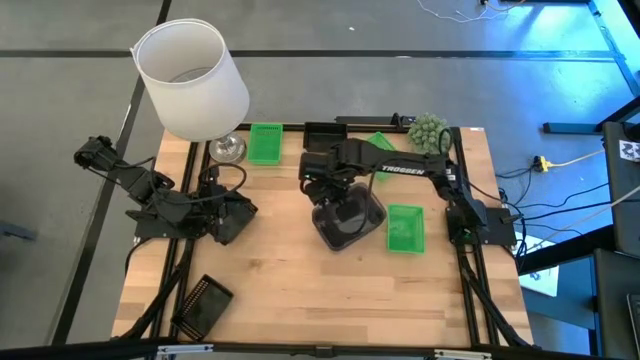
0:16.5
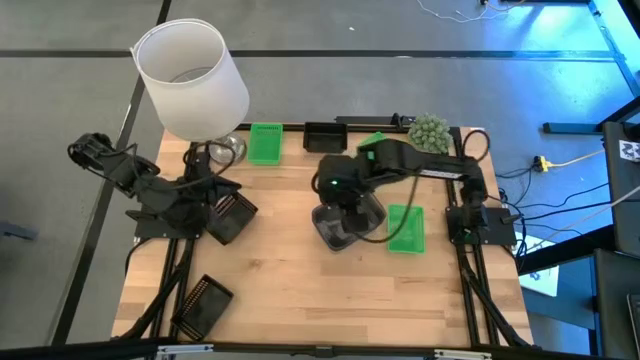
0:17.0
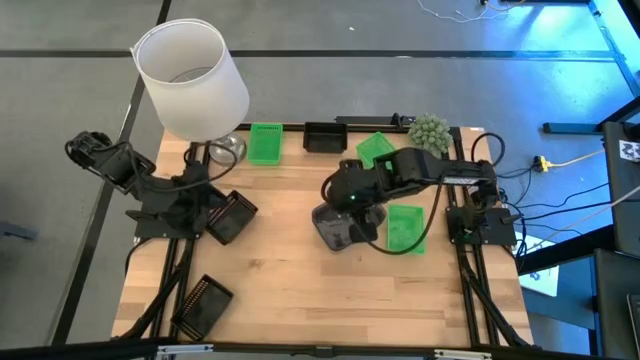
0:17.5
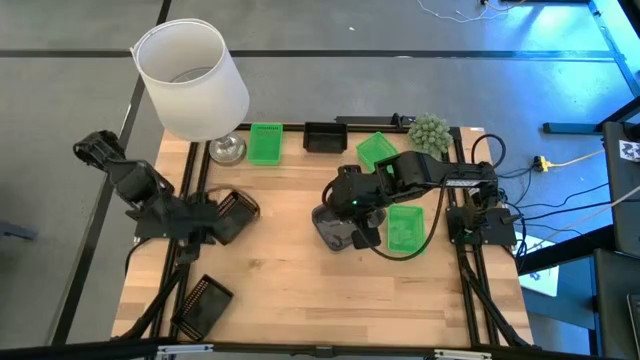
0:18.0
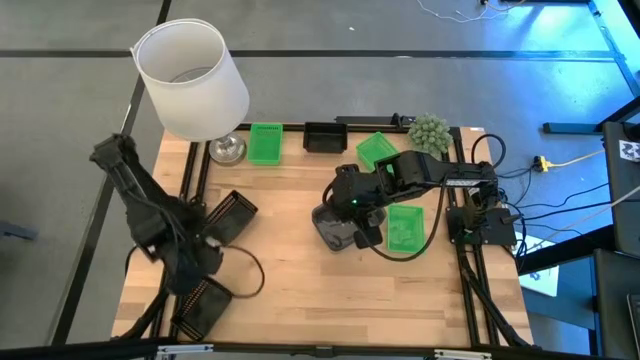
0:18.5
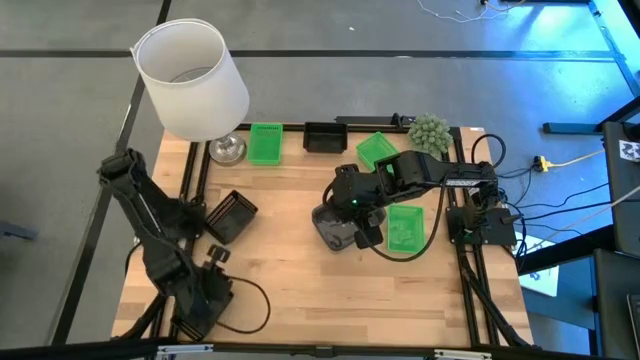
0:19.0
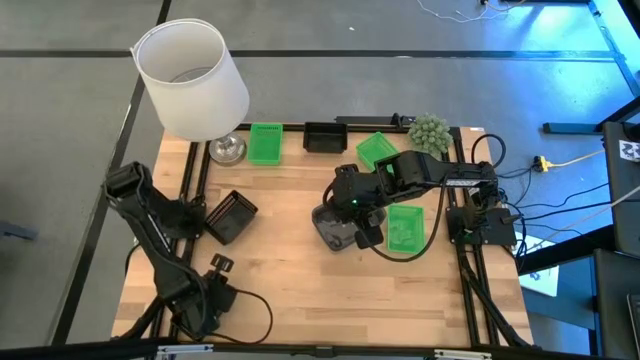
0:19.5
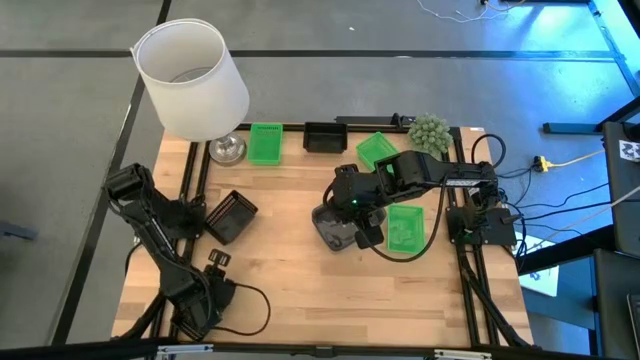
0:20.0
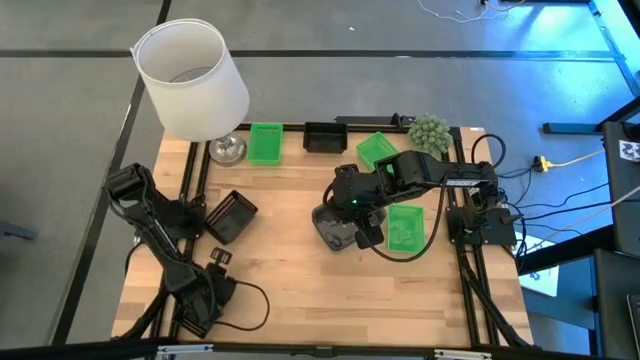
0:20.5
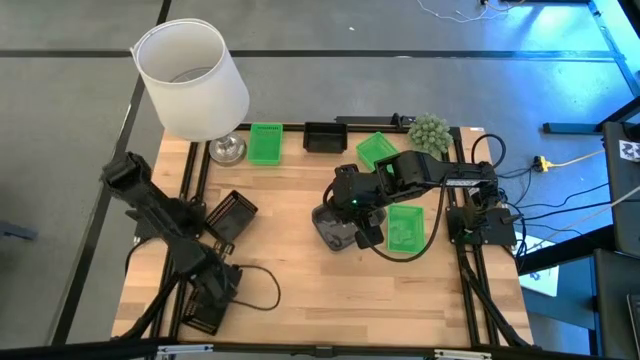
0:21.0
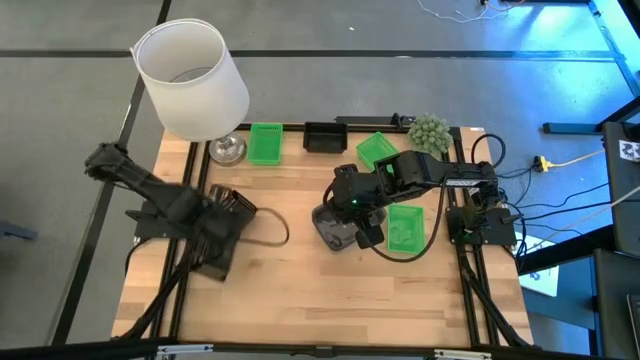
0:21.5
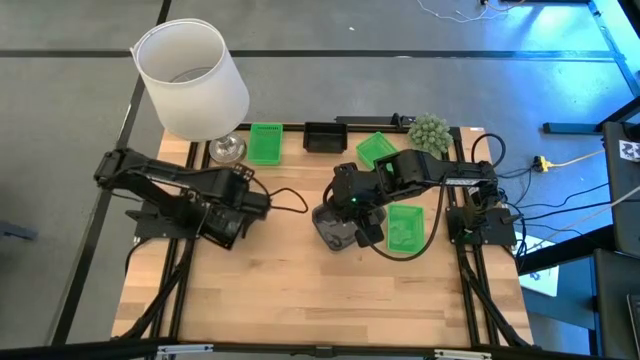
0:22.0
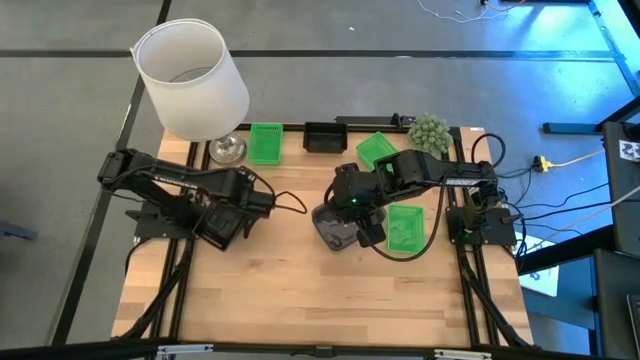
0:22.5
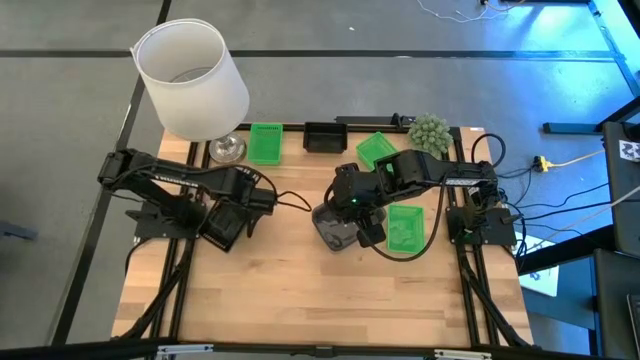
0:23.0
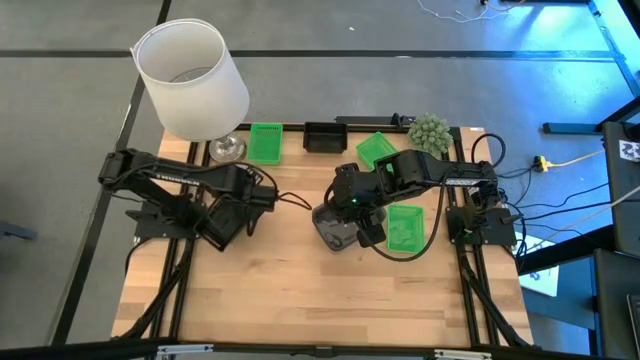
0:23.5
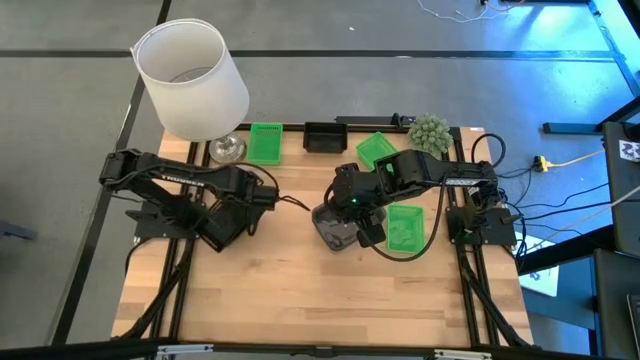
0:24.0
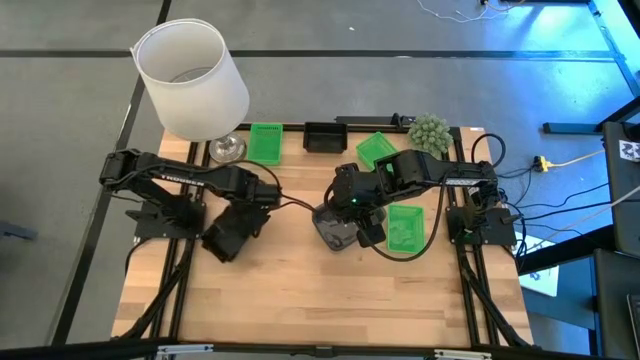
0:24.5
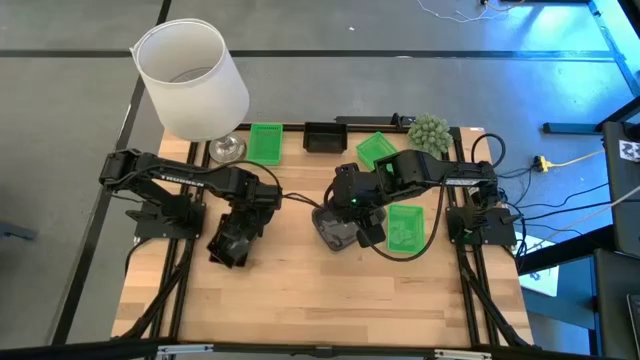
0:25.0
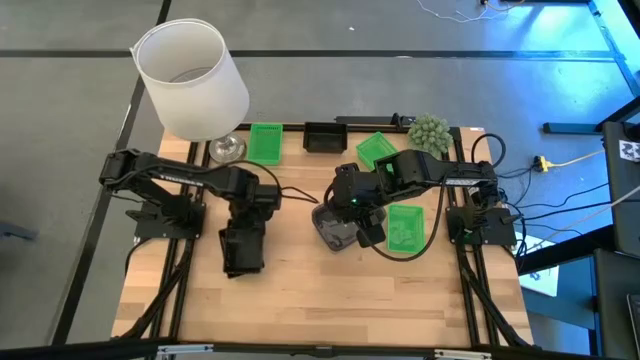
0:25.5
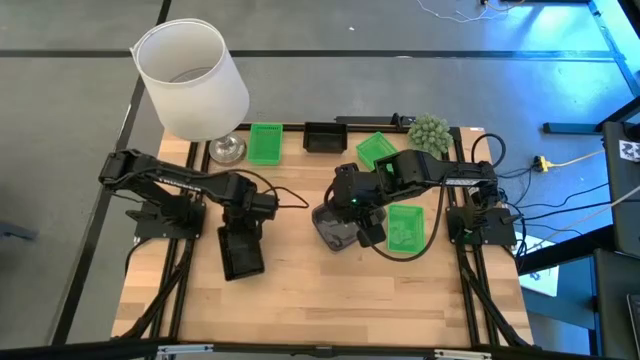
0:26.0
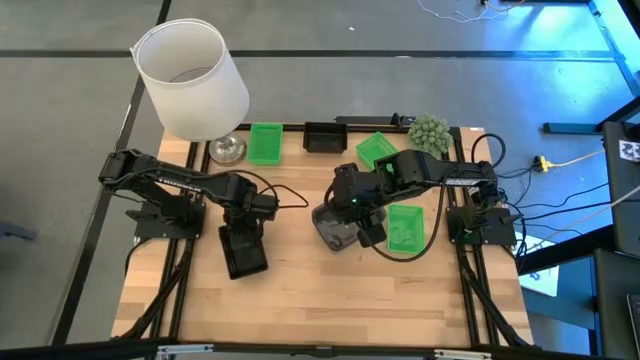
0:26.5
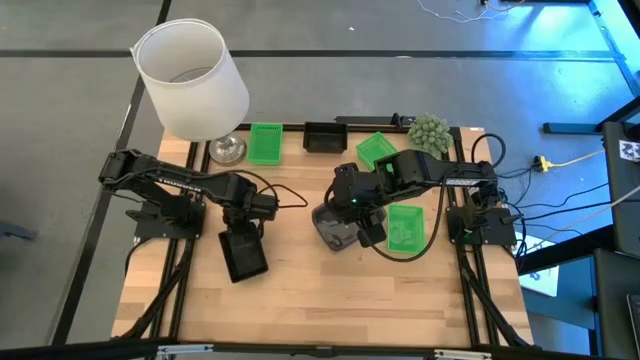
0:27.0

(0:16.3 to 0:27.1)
Stack the bottom black bin on top of the middle black bin

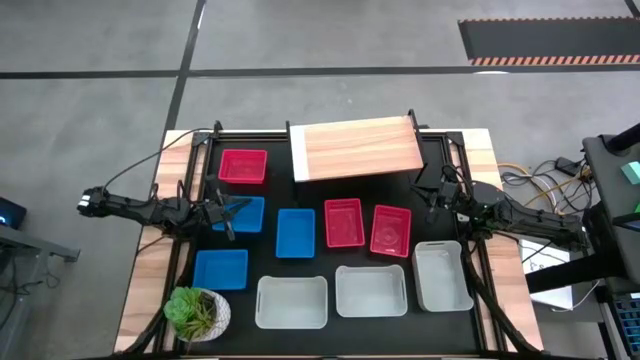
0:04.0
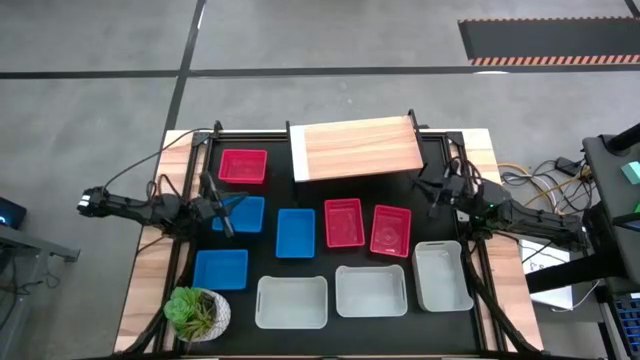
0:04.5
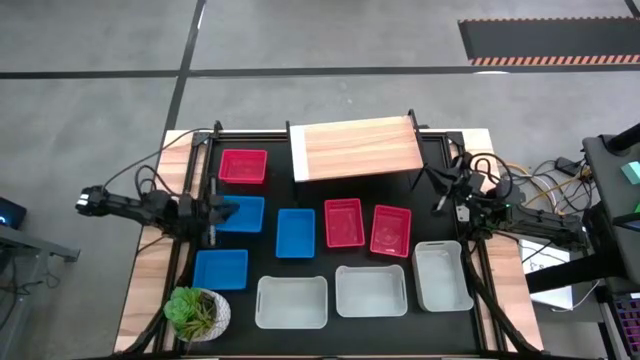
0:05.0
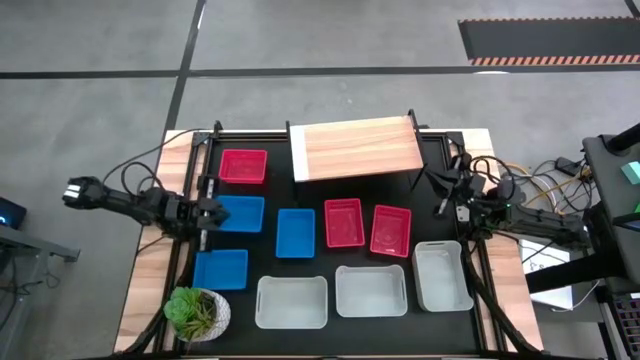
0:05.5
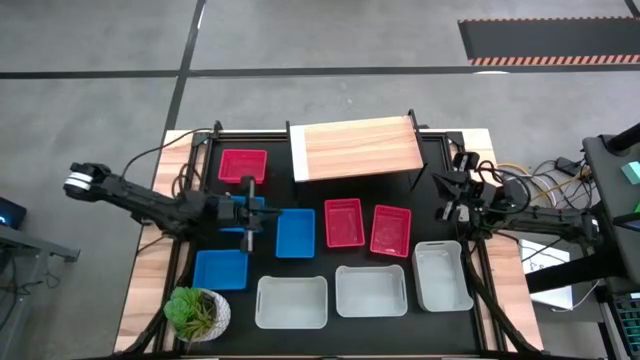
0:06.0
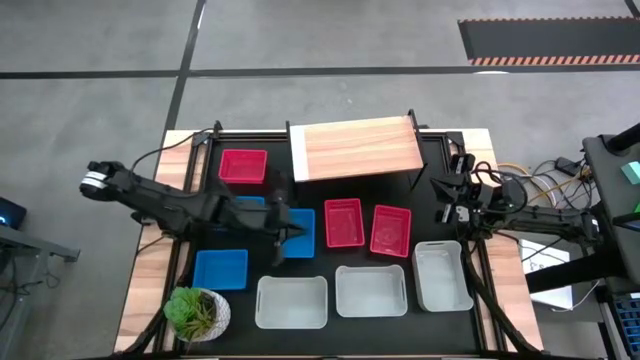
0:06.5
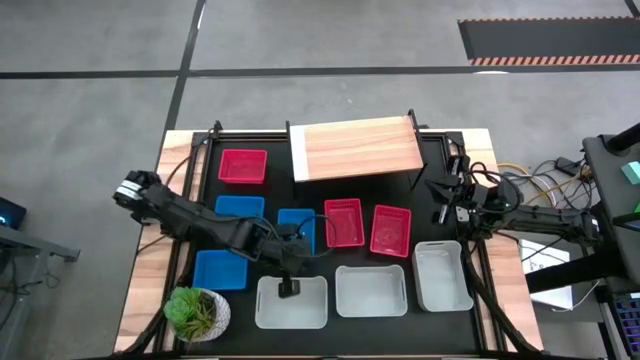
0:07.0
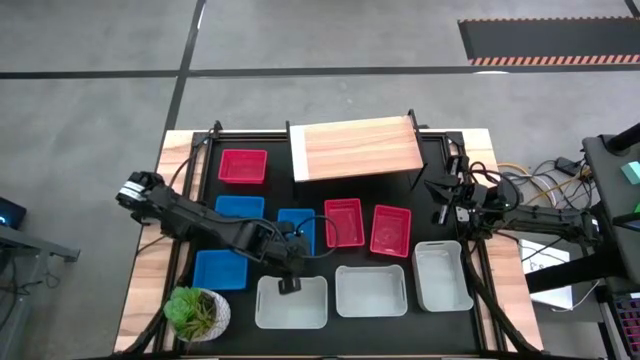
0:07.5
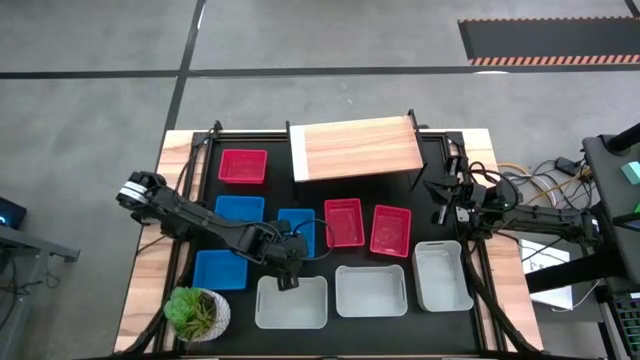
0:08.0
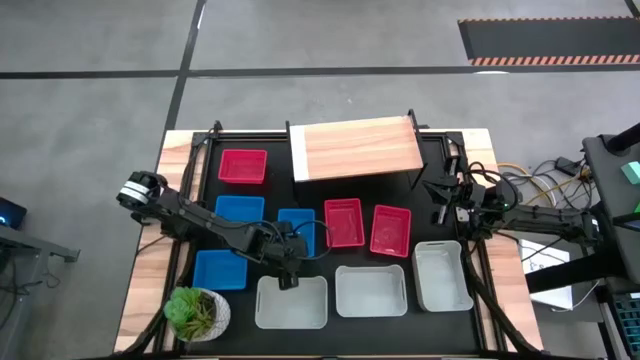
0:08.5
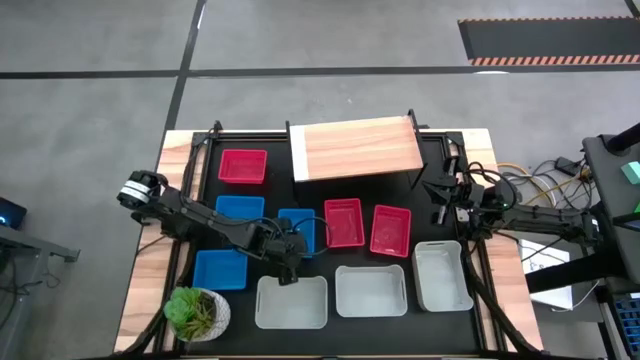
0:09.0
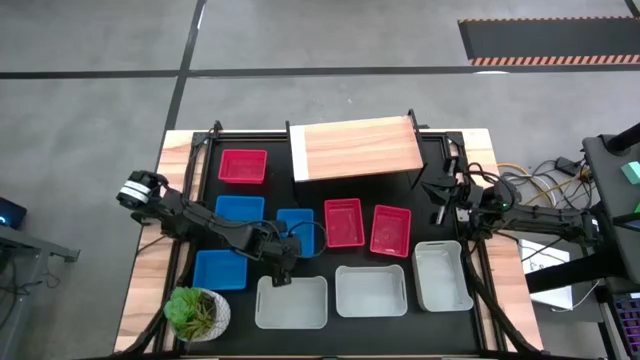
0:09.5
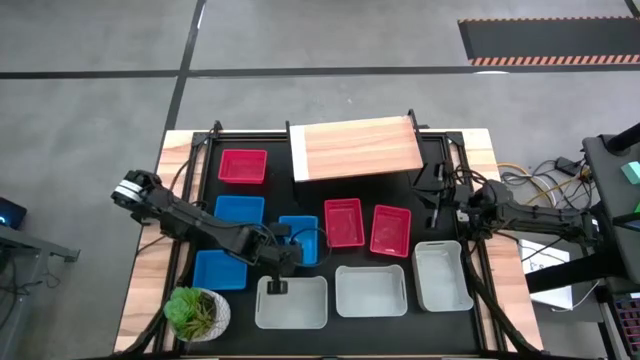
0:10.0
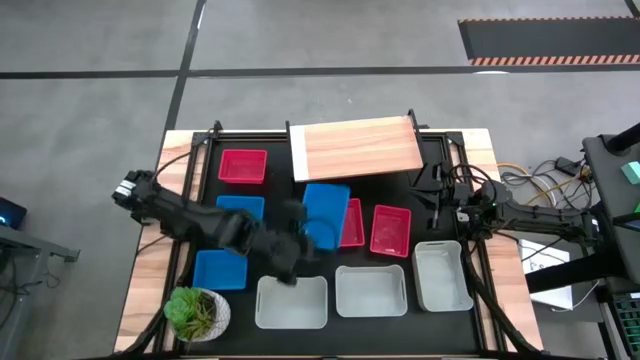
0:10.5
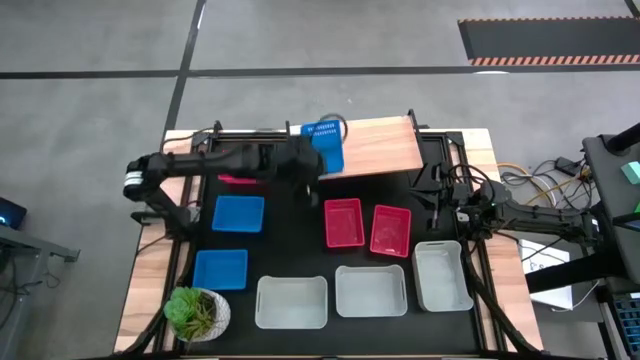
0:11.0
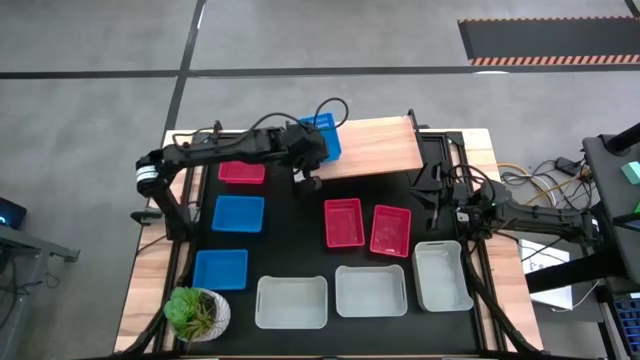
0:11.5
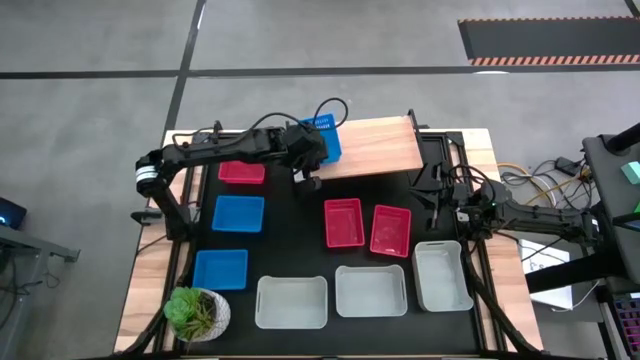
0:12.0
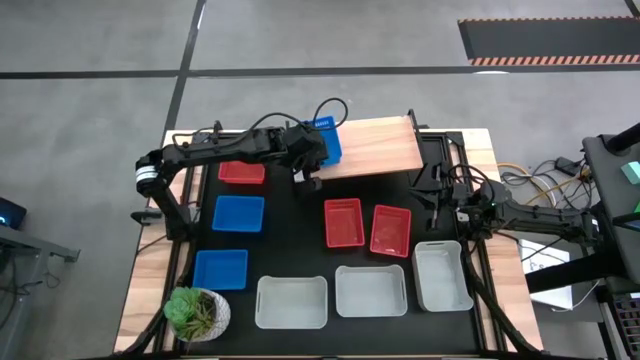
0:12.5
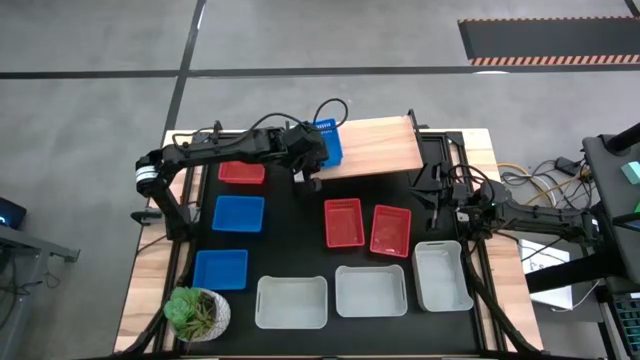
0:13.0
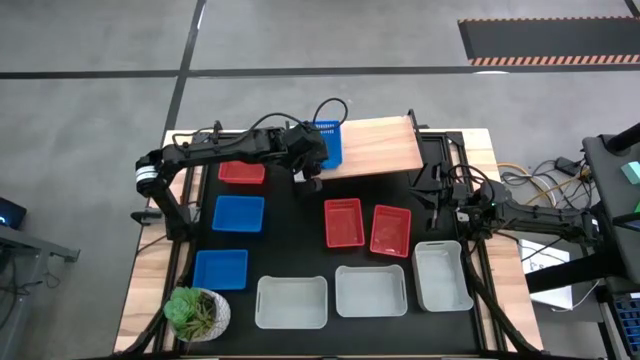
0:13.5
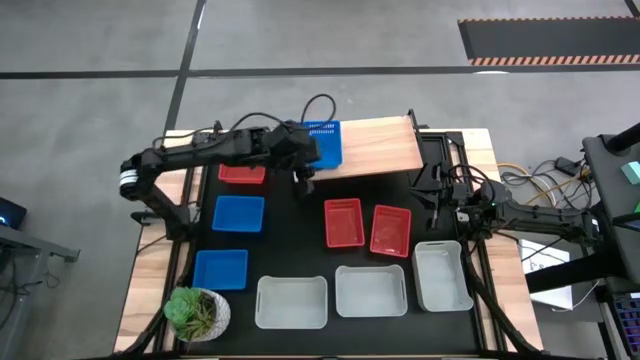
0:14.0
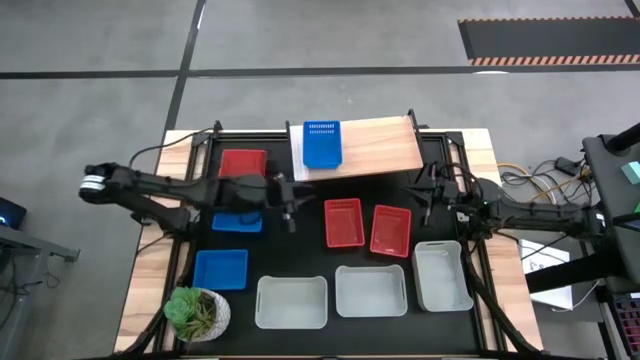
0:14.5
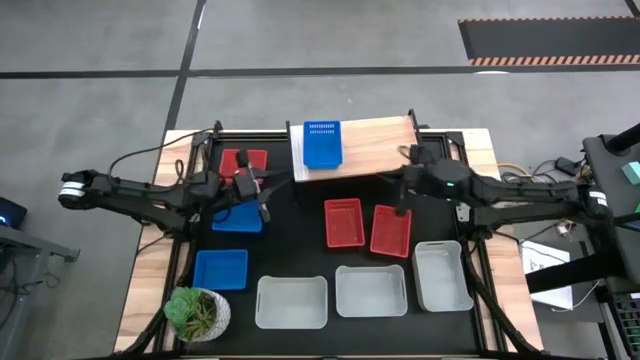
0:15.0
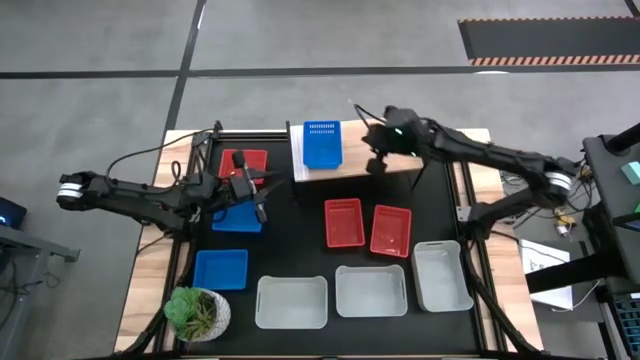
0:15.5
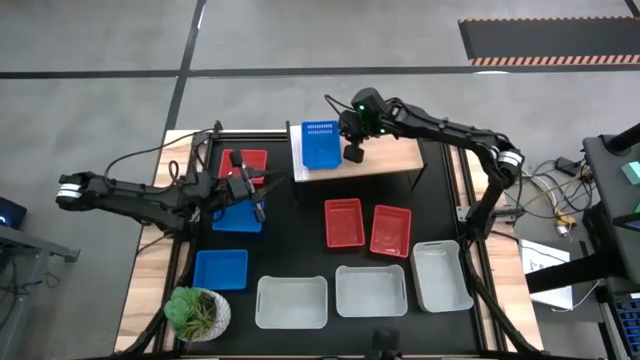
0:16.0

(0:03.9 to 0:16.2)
Put the middle blue basket on the shelf
